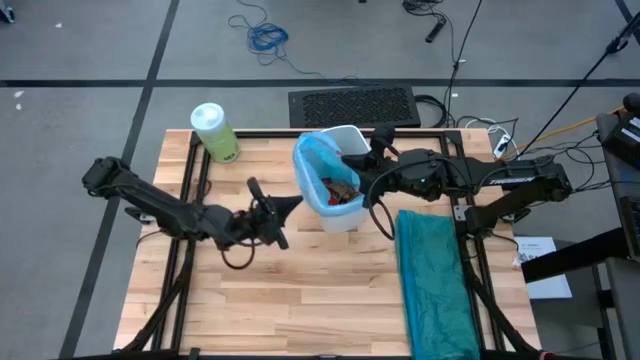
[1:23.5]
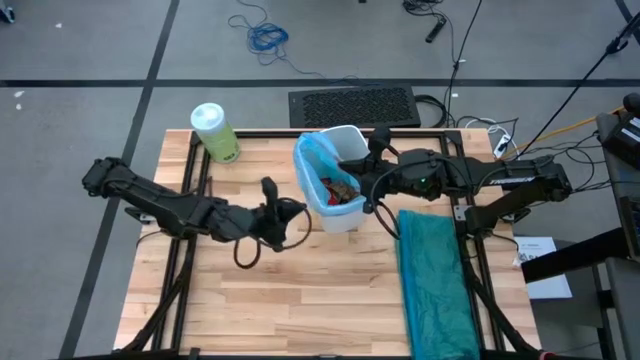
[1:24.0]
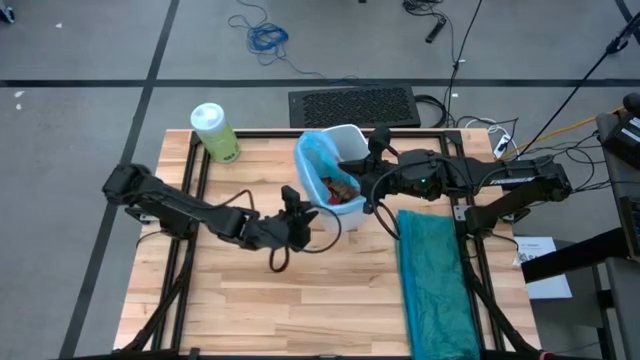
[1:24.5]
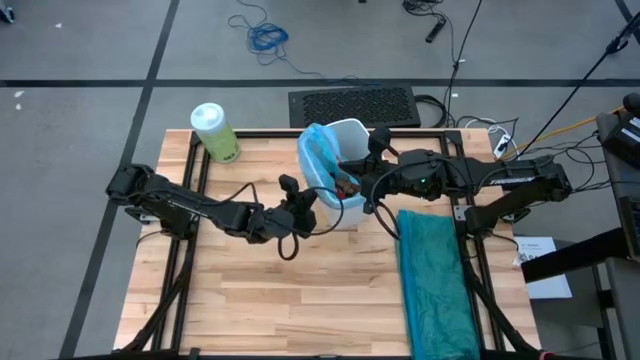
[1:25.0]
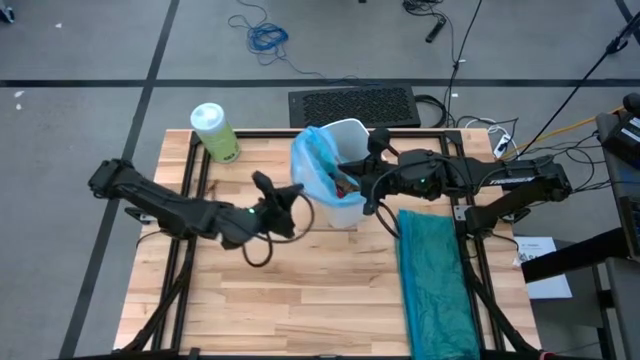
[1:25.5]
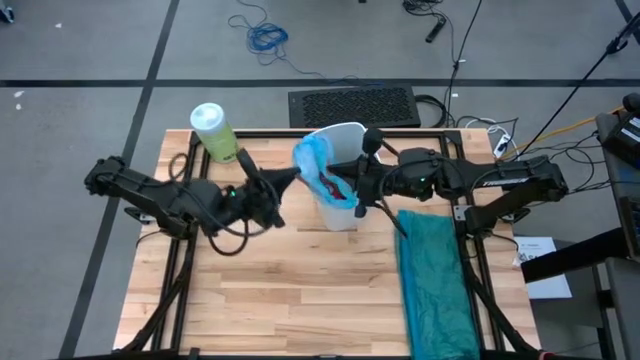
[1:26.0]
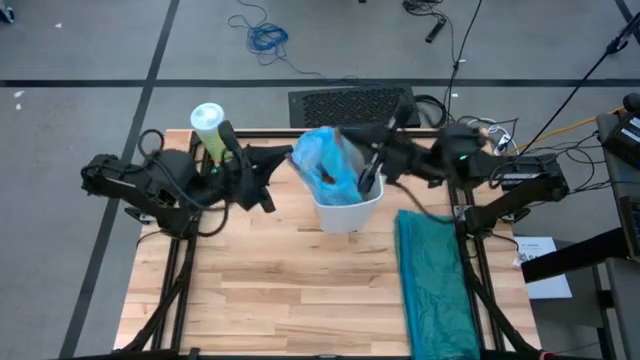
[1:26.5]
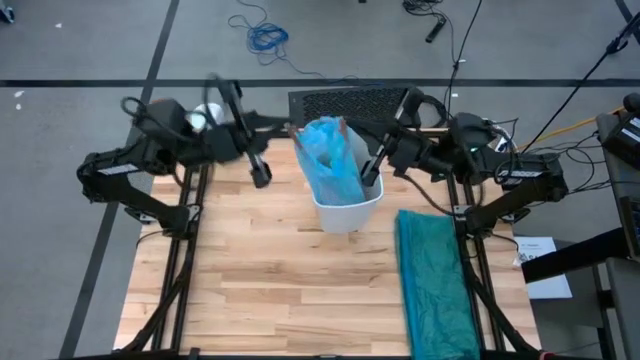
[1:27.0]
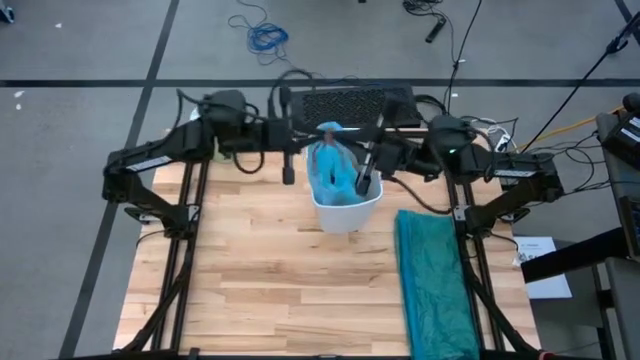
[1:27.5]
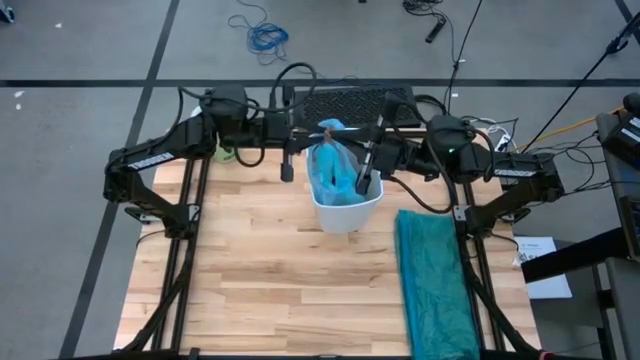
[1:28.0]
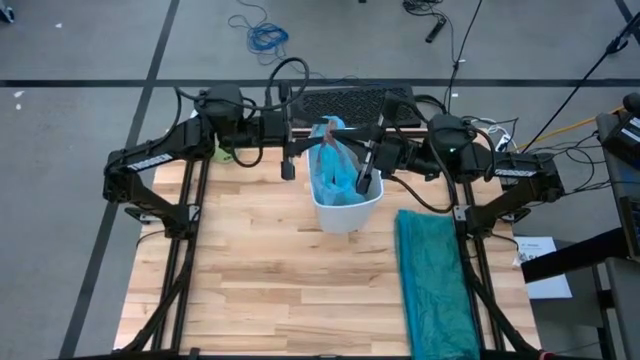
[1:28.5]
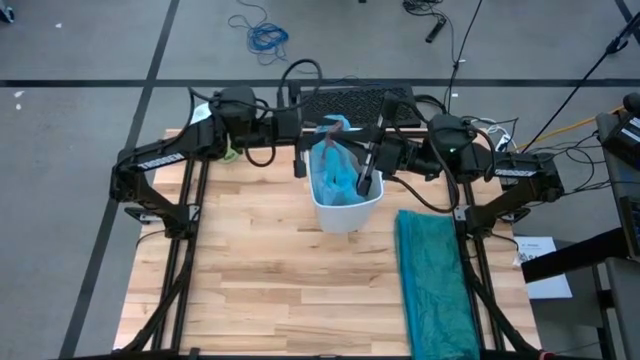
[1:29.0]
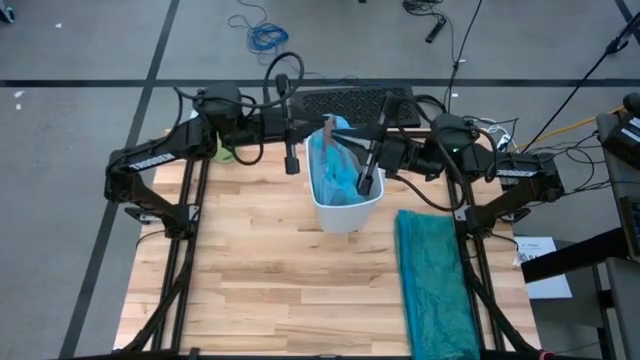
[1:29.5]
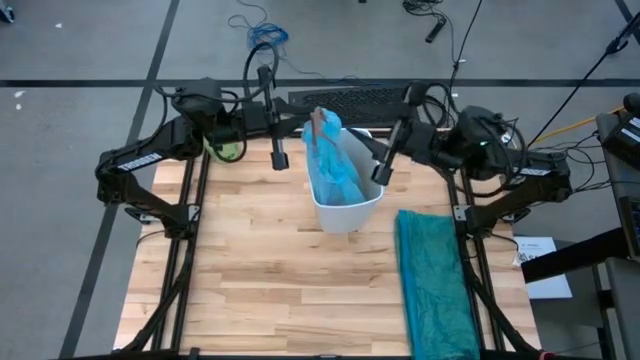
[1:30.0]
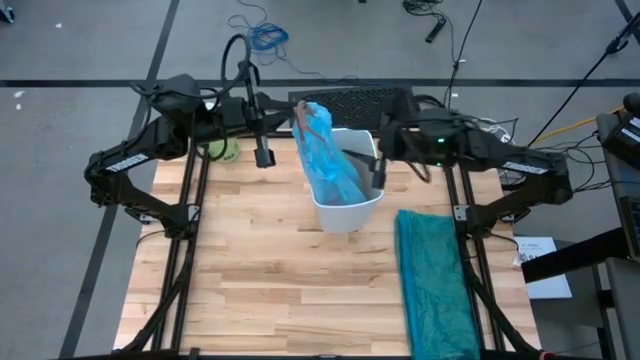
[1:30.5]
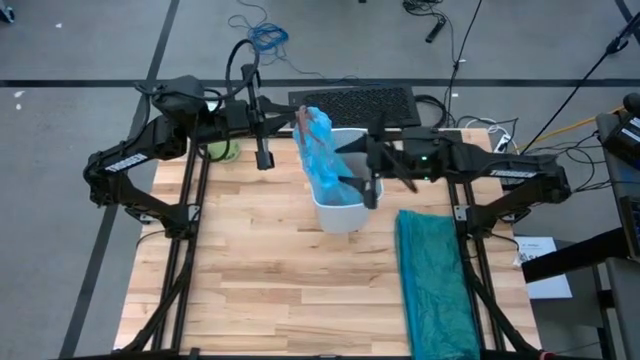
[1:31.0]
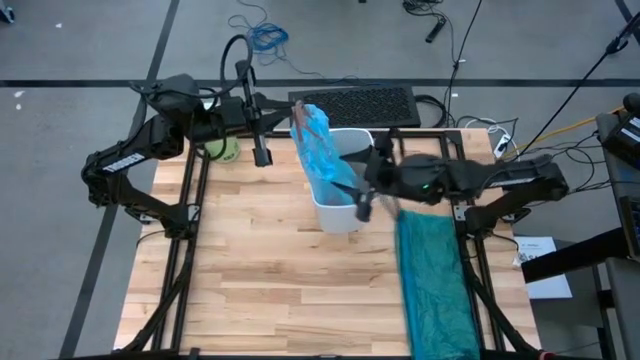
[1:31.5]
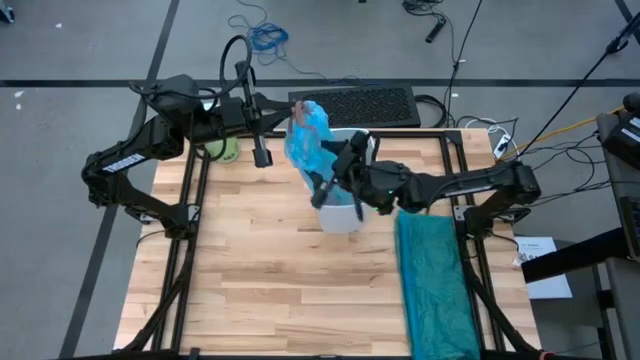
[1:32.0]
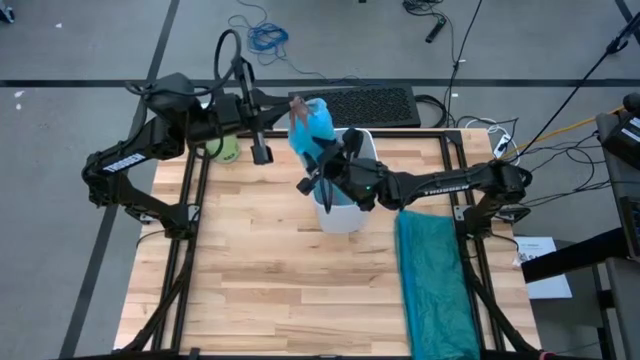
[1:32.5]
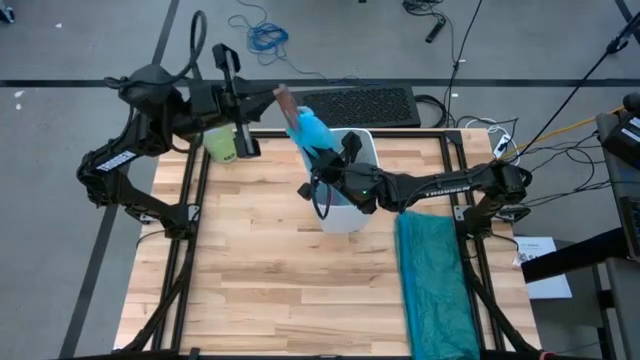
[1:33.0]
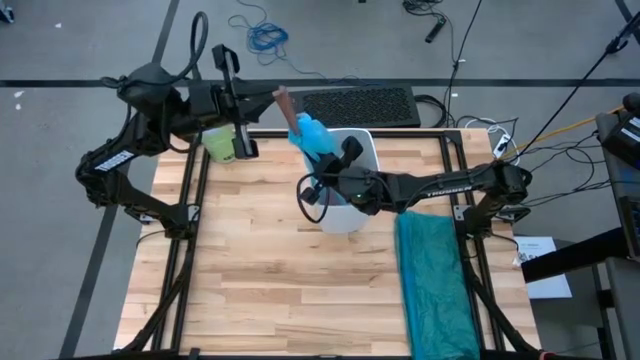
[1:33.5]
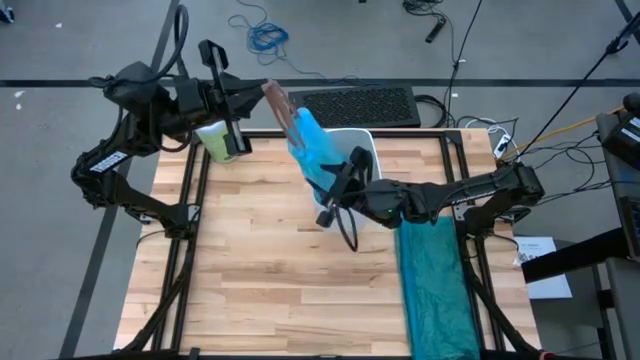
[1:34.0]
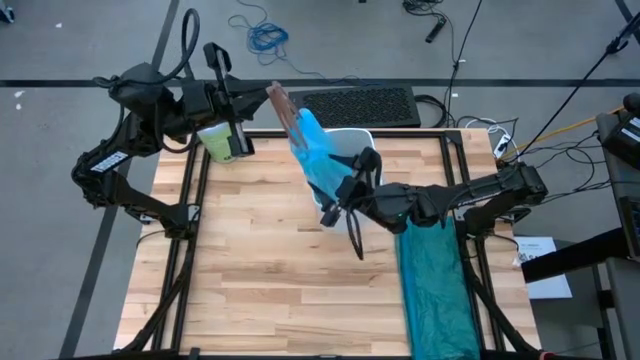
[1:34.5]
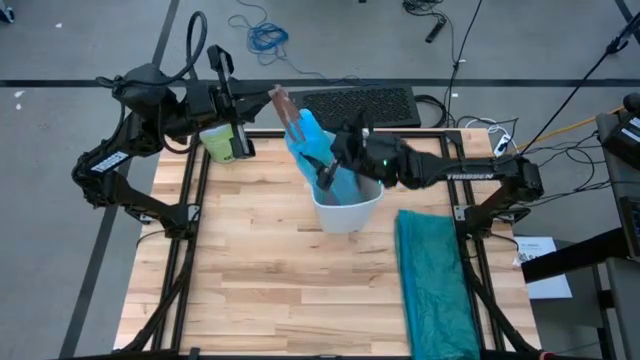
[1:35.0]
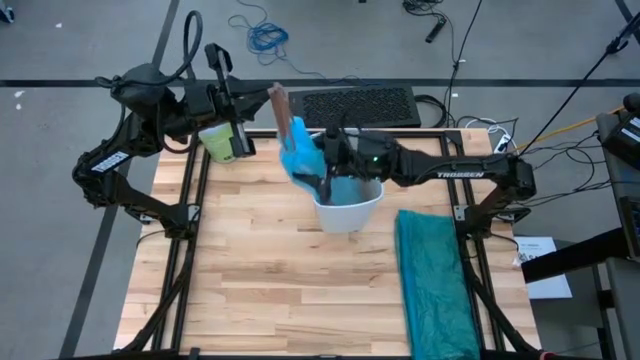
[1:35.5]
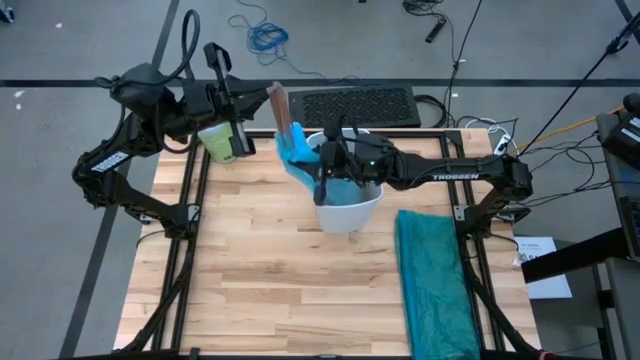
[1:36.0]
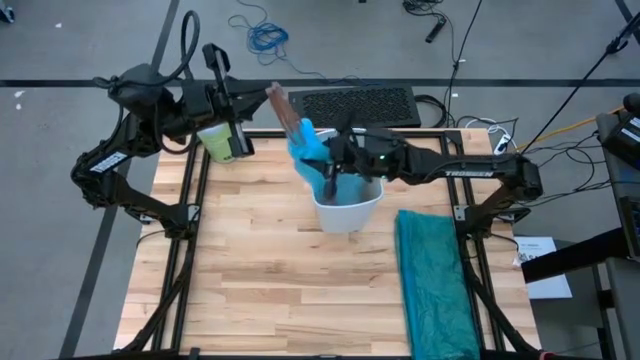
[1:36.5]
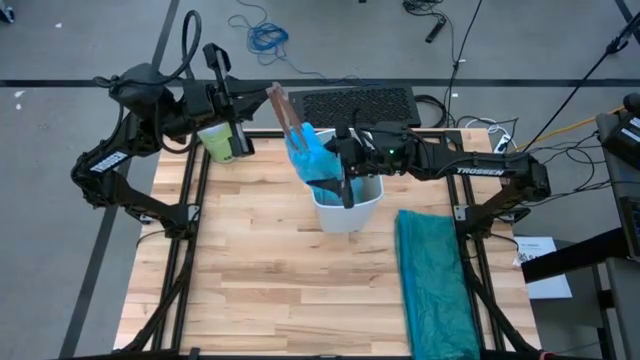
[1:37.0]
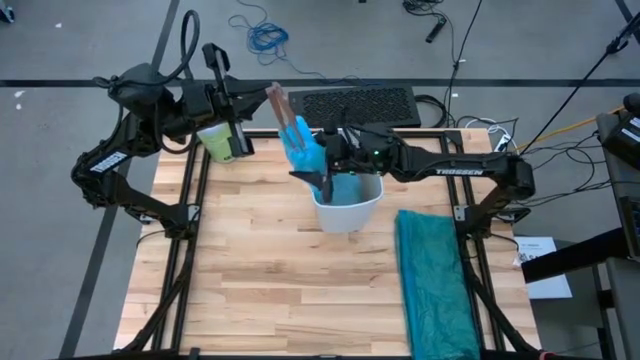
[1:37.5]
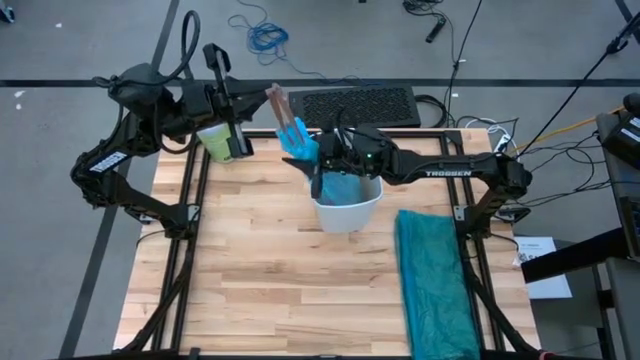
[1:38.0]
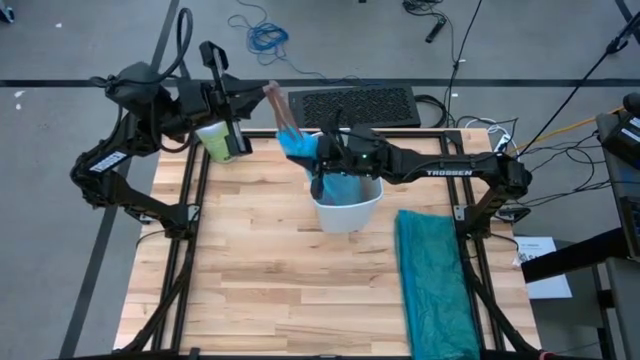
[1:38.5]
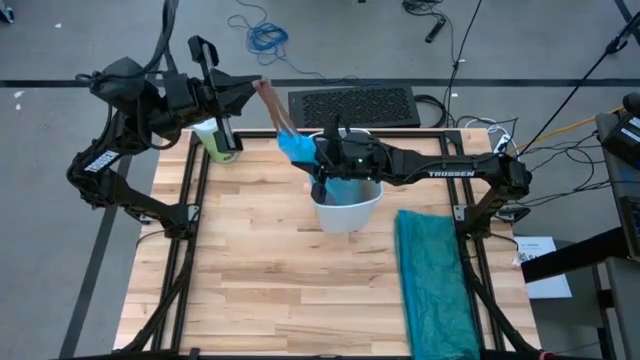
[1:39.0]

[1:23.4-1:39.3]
Task: place trash/remove bag and relplace
Close the blue plastic bag

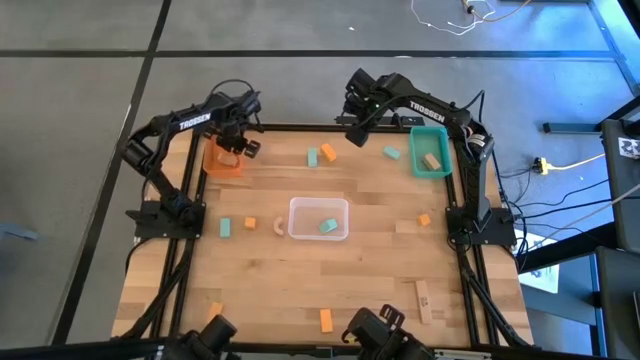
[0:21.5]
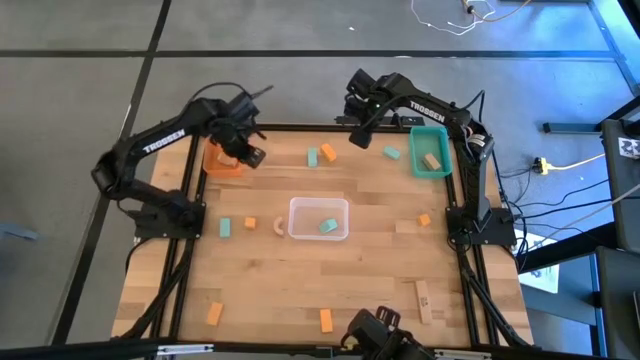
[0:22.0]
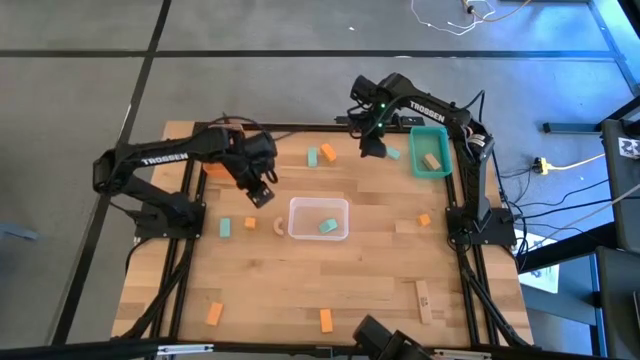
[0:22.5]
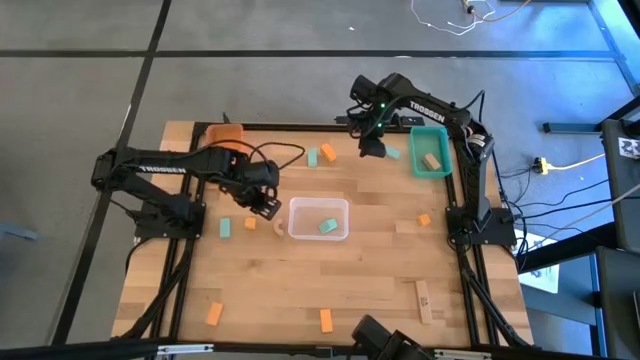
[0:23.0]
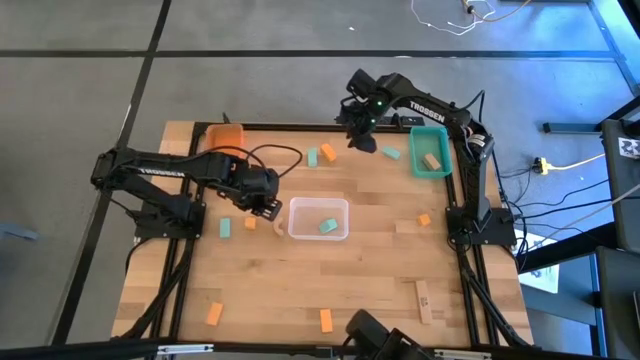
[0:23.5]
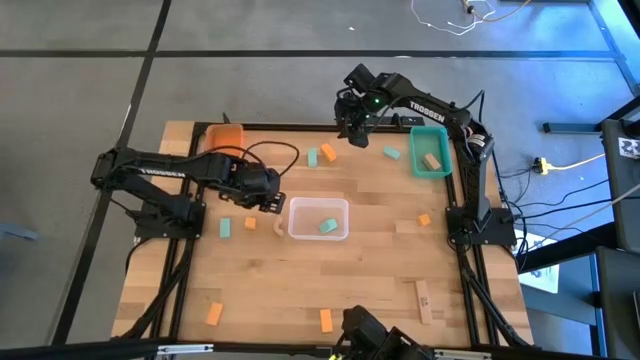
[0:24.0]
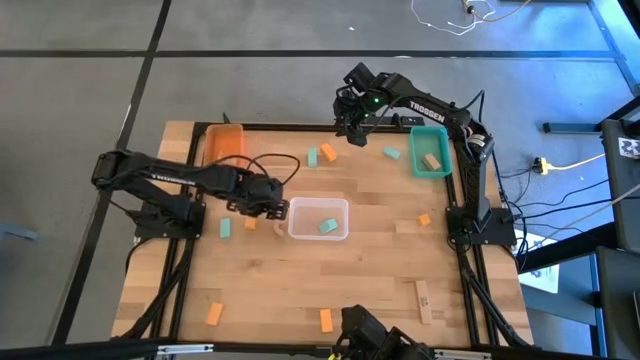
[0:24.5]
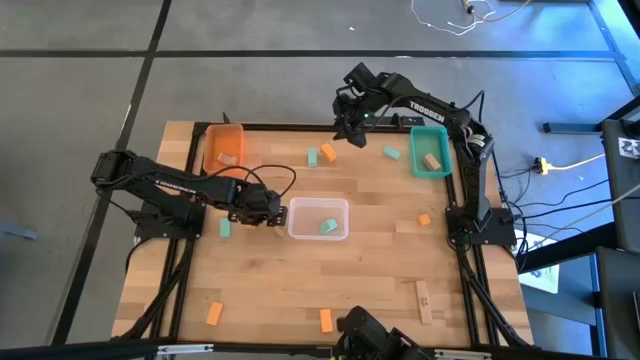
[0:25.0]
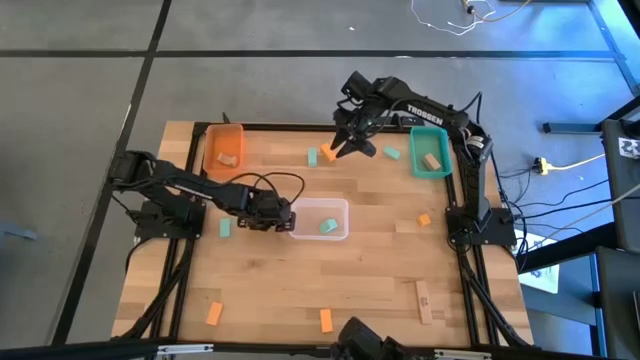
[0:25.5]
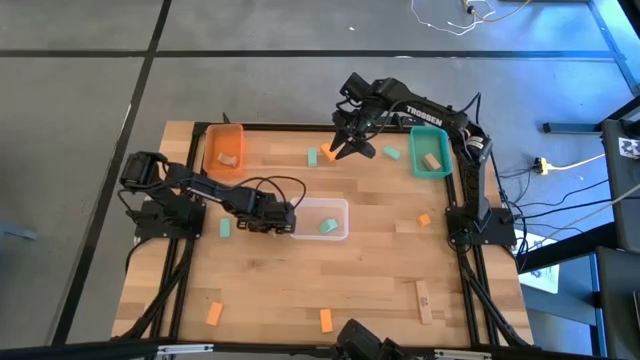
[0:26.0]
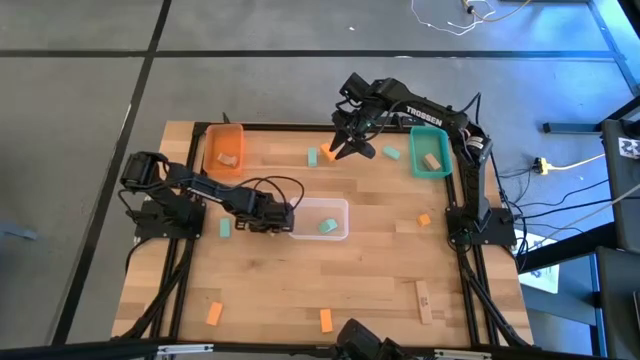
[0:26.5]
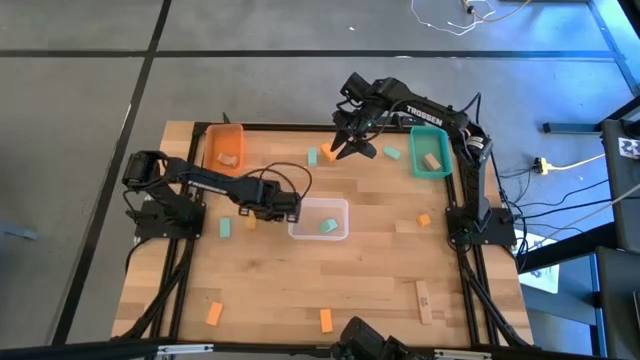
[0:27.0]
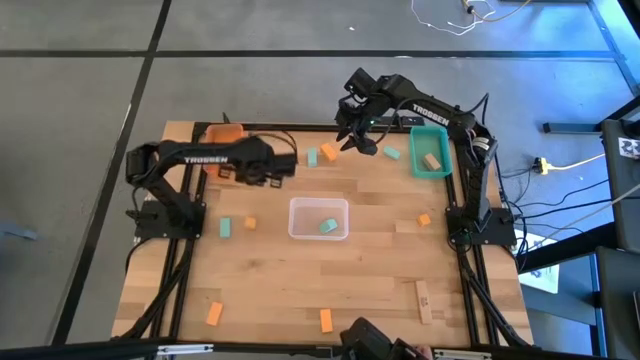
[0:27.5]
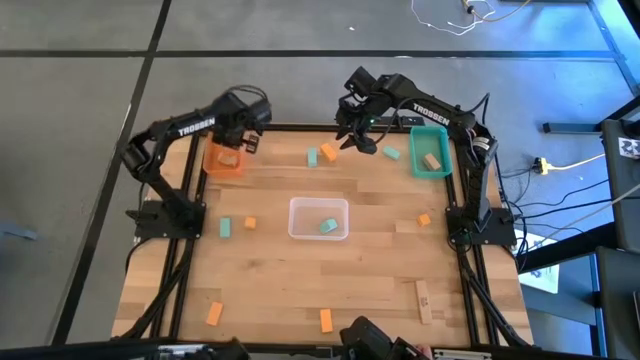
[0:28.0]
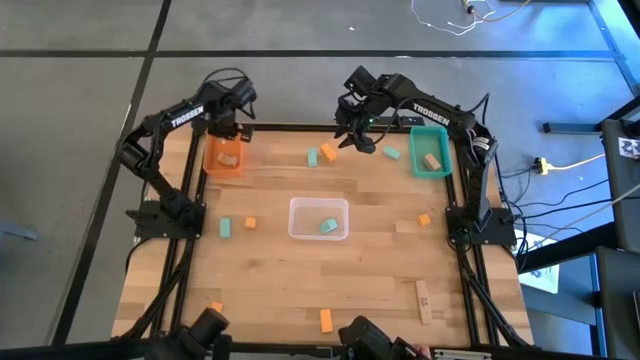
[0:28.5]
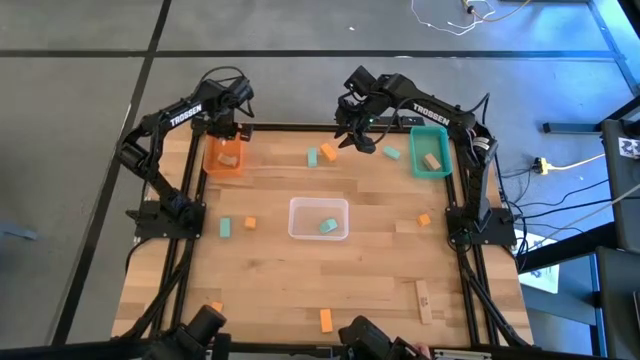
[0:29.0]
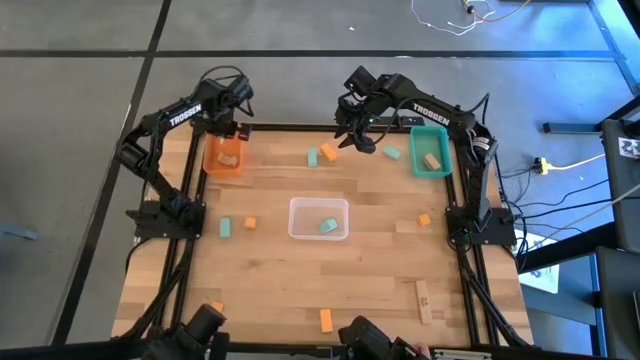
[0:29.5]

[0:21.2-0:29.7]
Task: Sort & place blocks by color
Put the light brown block into the orange bin
